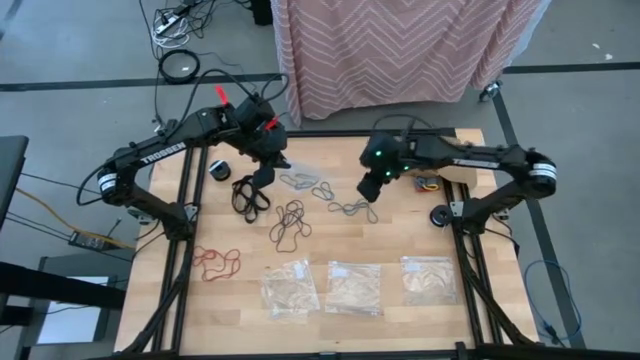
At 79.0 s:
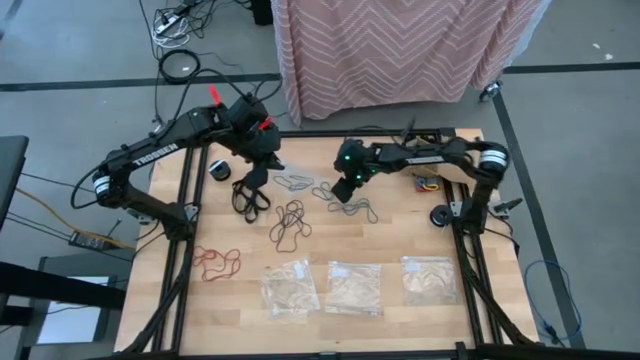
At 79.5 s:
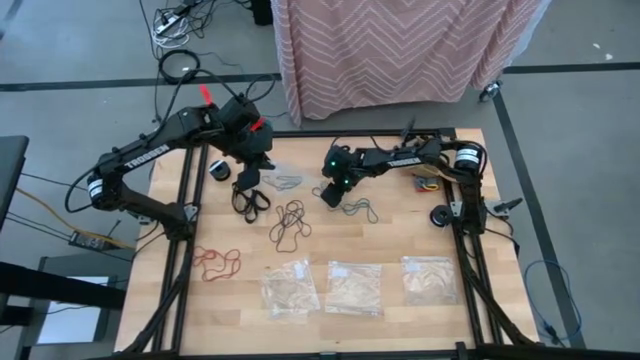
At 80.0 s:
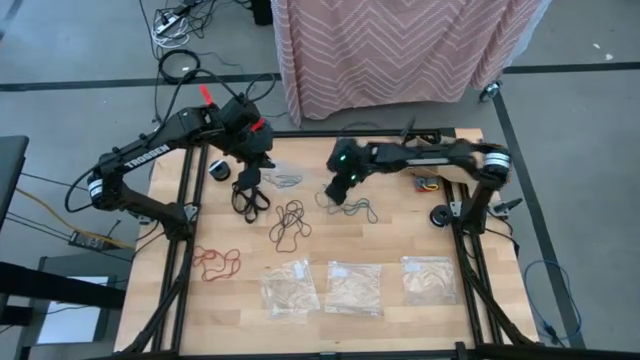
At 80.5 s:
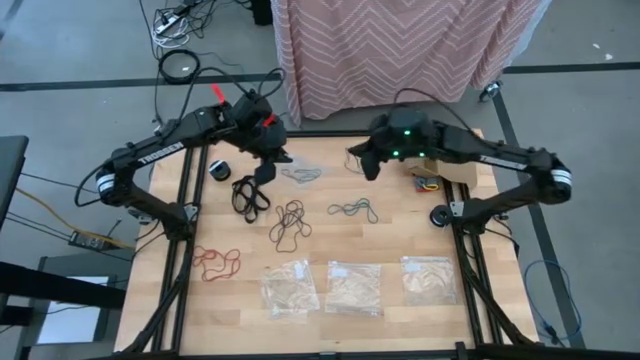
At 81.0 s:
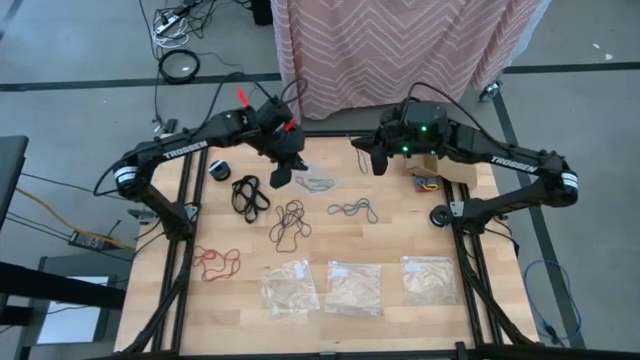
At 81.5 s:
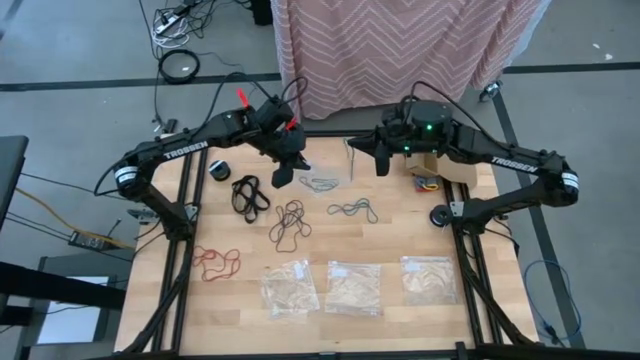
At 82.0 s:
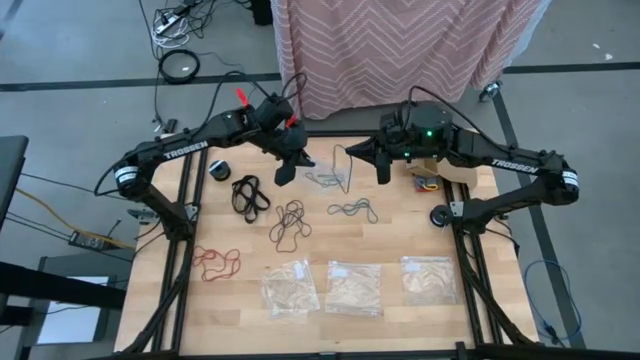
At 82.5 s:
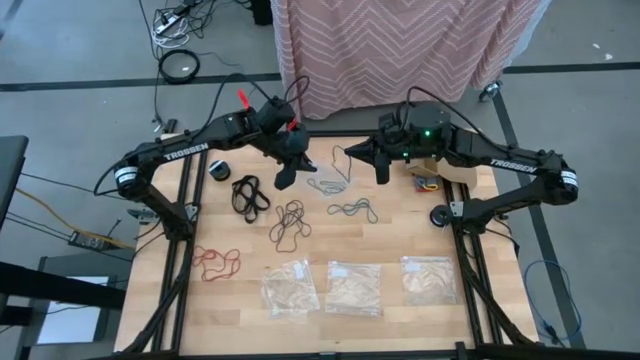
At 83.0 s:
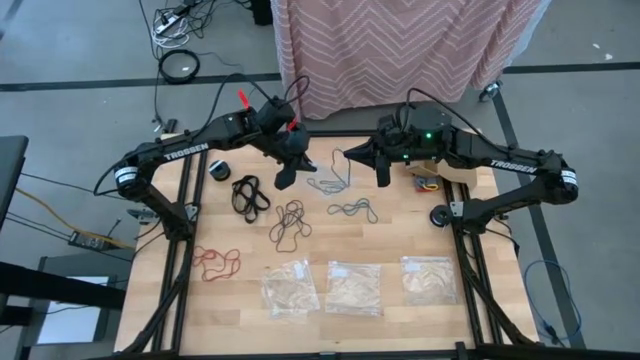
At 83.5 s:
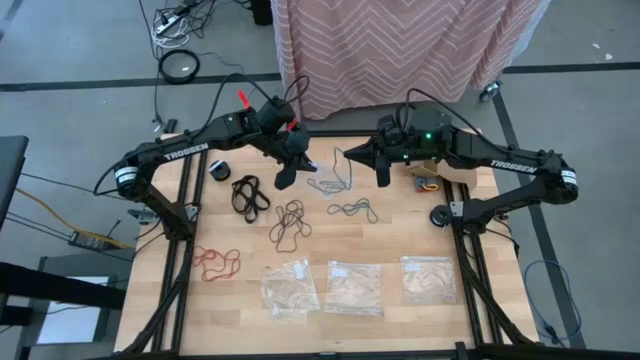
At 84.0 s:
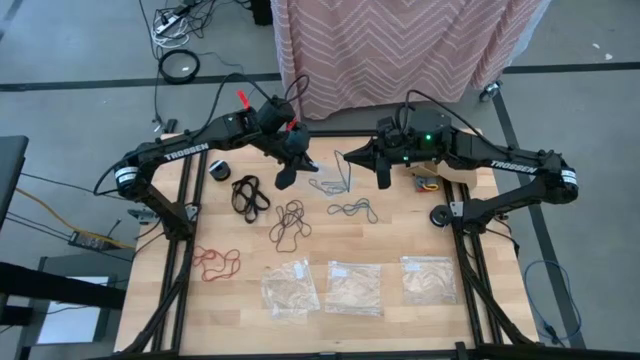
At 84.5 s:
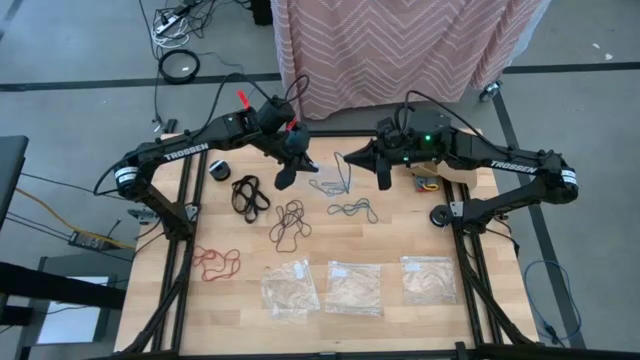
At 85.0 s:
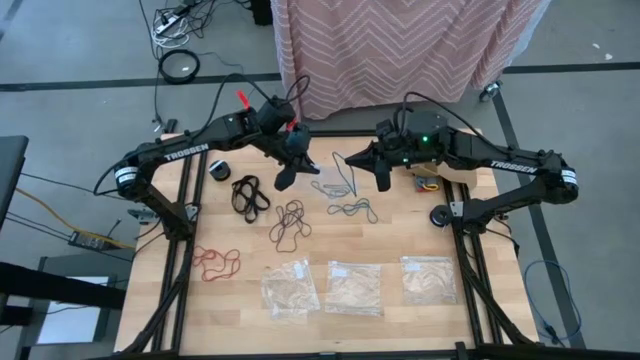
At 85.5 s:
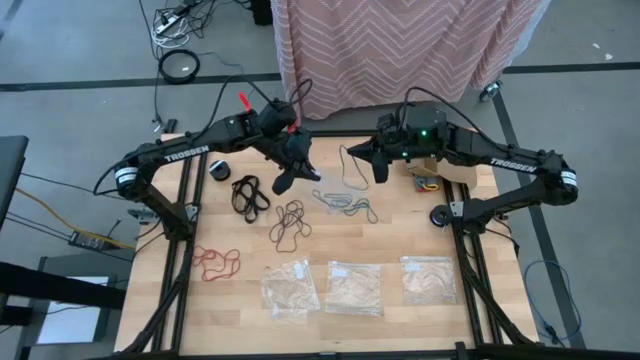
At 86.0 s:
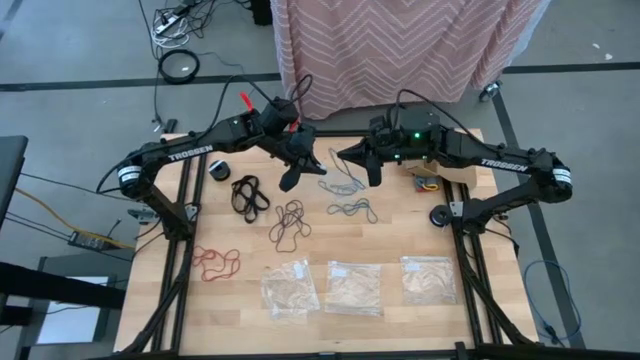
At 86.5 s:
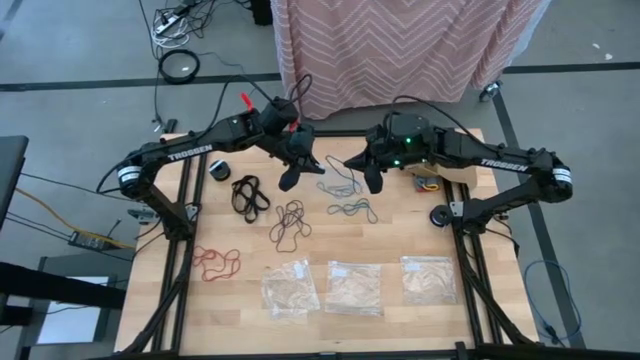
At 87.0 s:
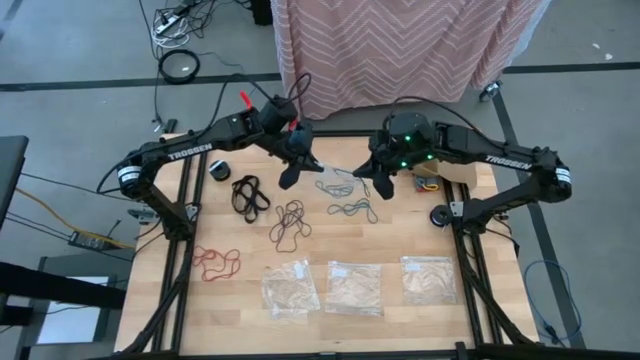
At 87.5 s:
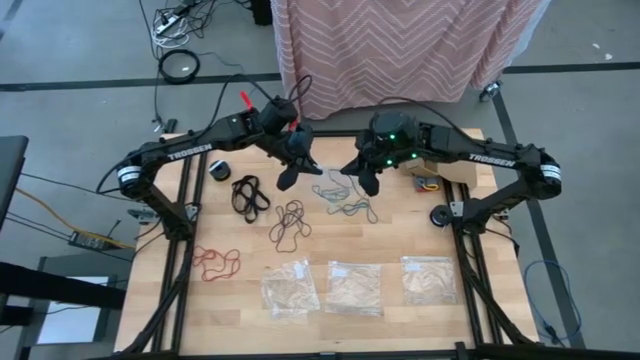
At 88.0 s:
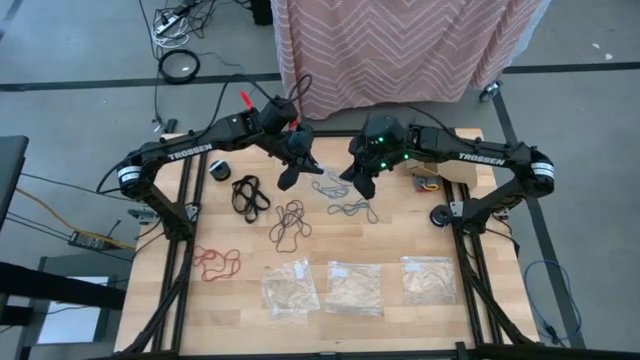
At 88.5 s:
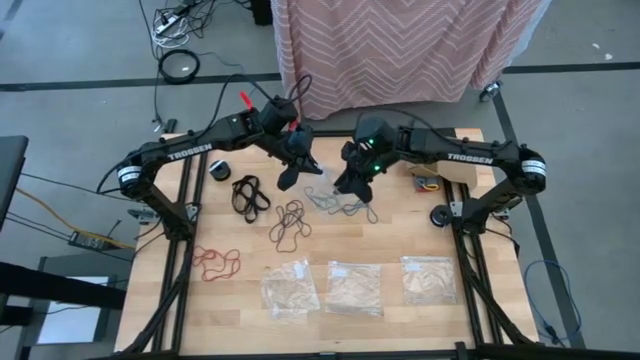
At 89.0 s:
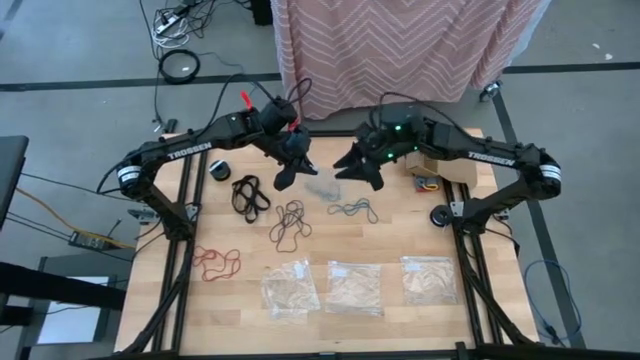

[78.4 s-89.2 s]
Task: Sort rubber bands
Put the blue rubber band into the top transparent zip bag

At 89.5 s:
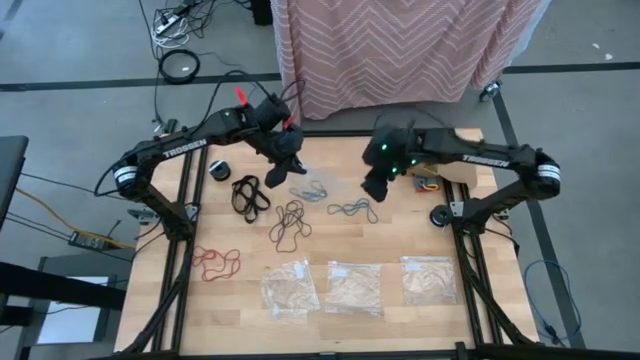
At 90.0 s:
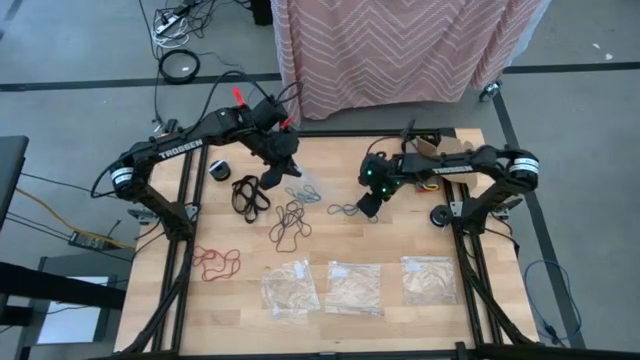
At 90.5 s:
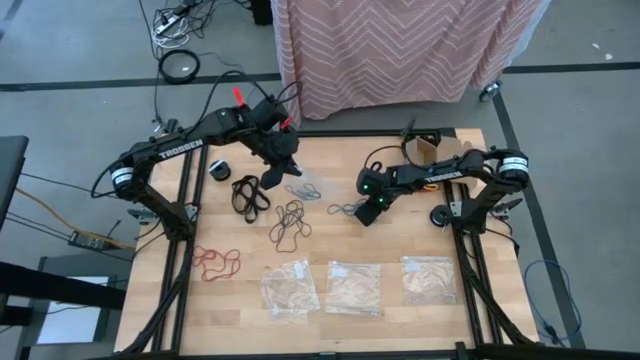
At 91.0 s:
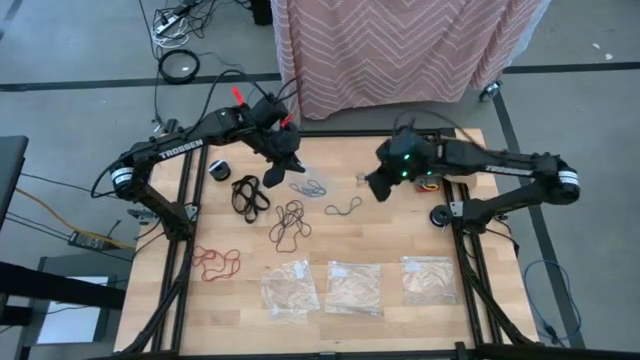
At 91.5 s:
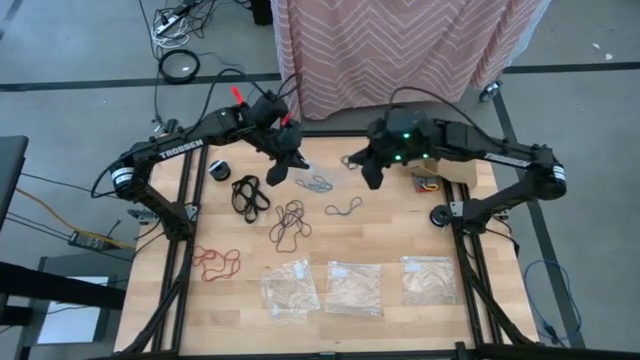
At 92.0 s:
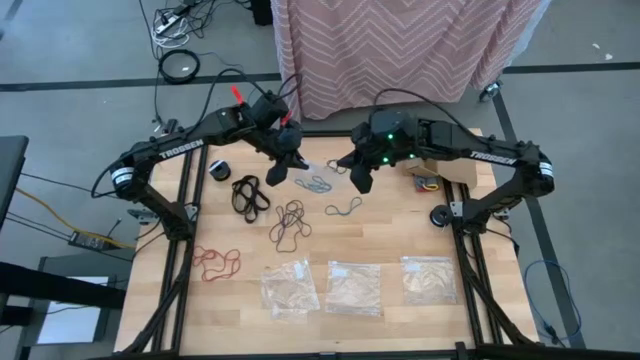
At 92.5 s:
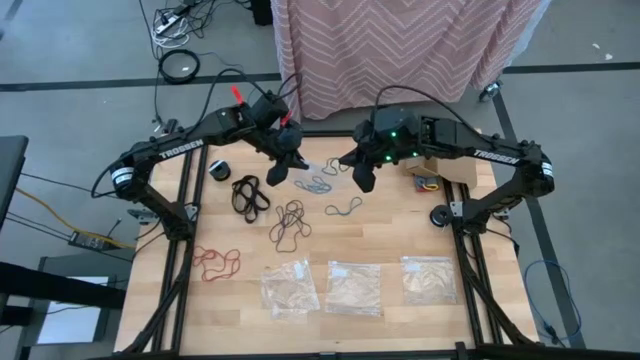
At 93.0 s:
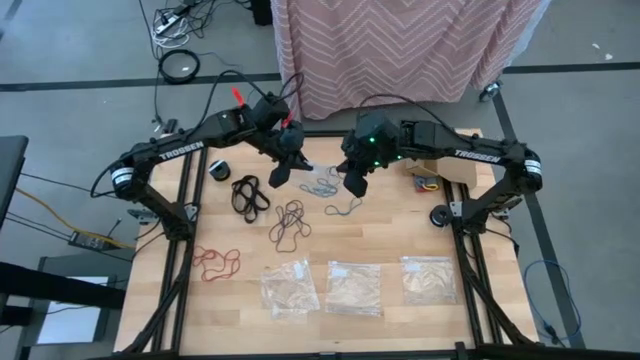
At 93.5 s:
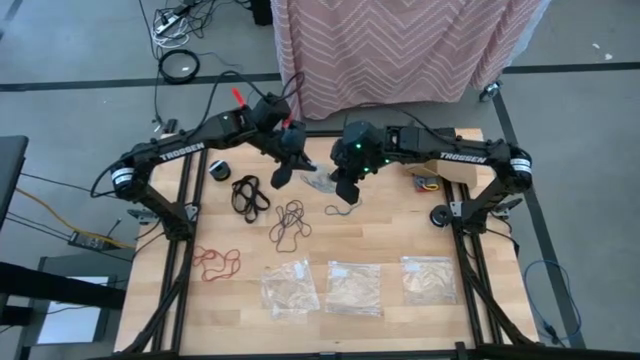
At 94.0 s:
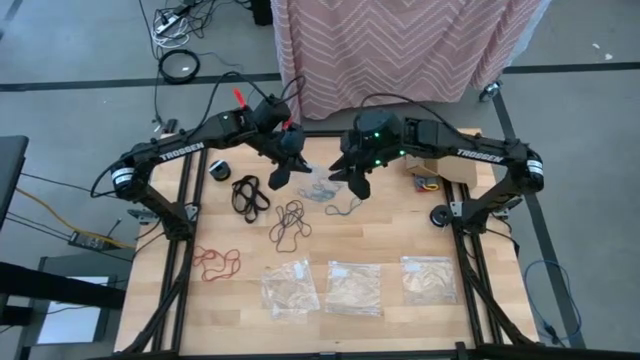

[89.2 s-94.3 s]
Put the blue rubber band into the top transparent zip bag

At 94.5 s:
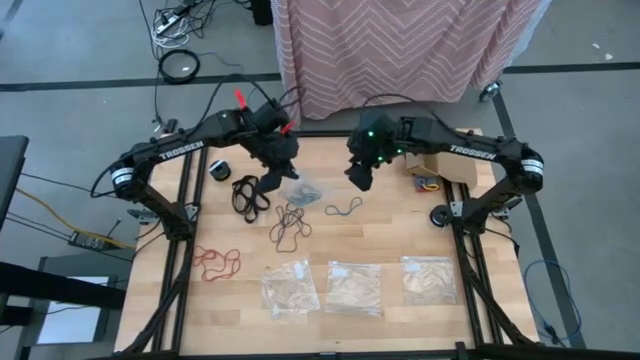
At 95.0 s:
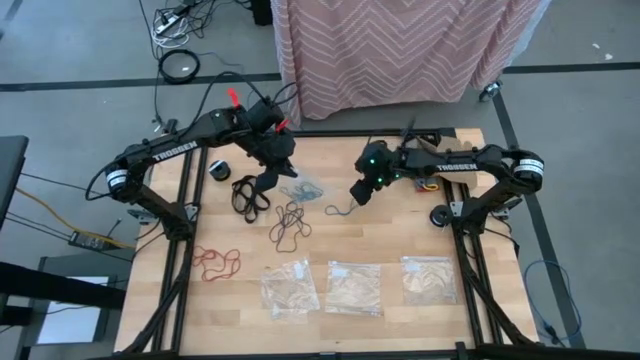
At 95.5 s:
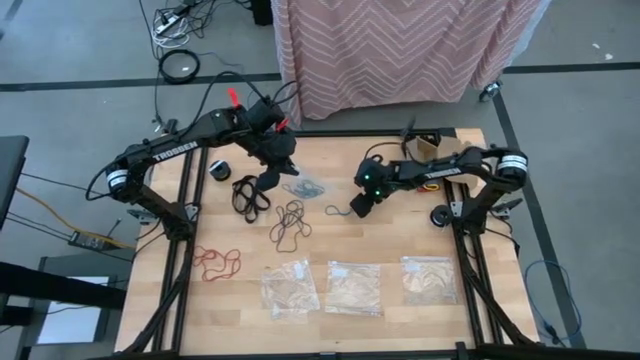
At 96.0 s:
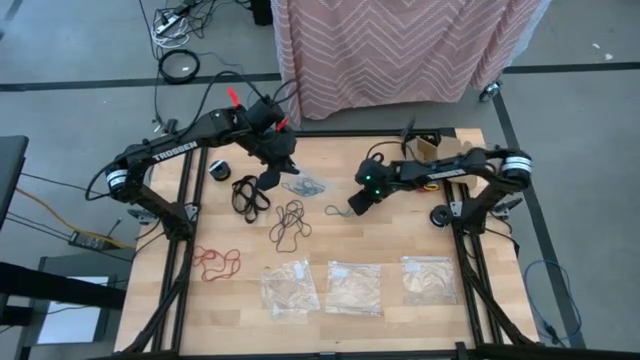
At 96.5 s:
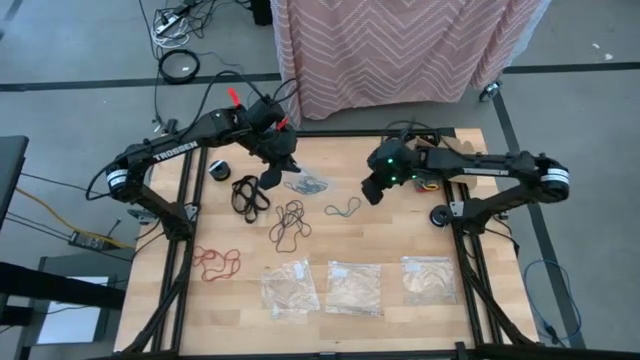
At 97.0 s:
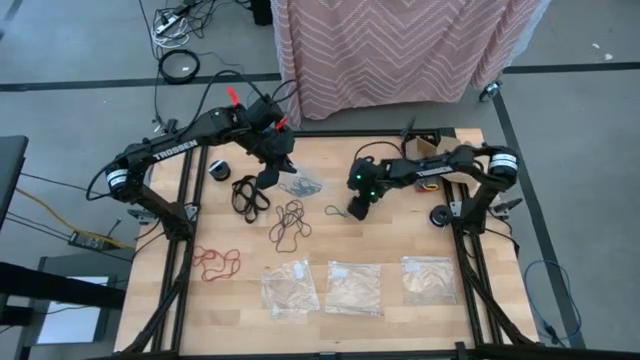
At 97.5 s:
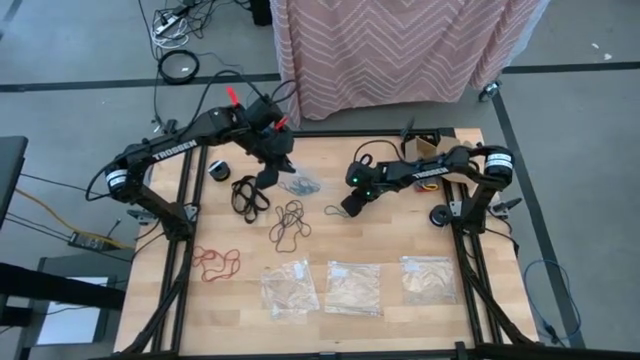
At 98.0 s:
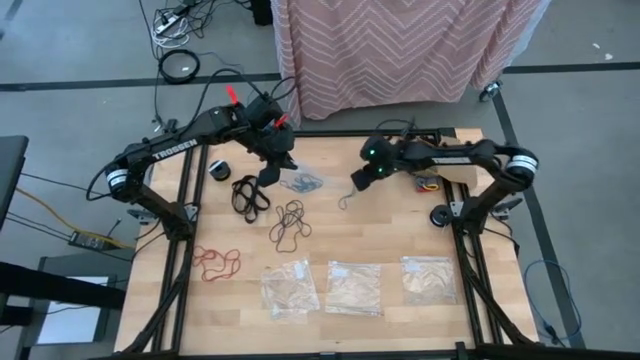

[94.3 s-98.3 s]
Put the blue rubber band into the top transparent zip bag

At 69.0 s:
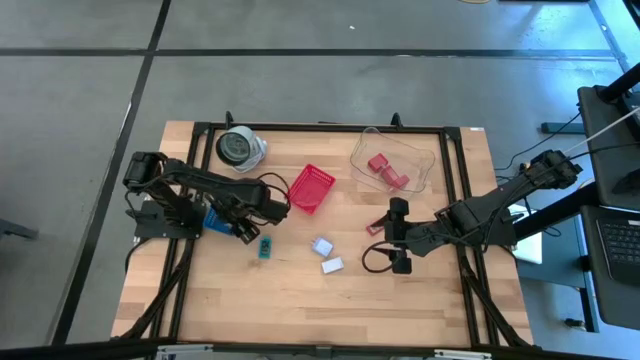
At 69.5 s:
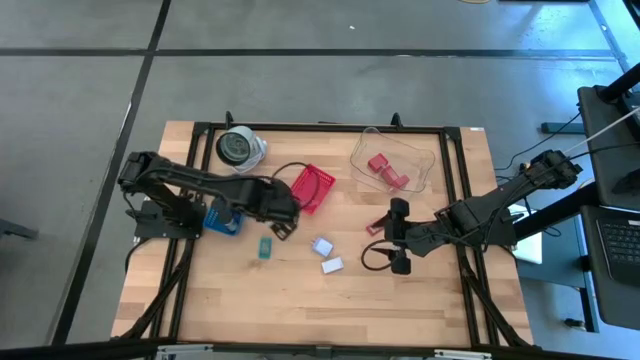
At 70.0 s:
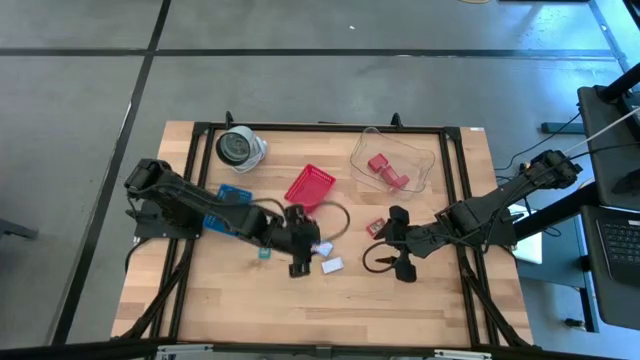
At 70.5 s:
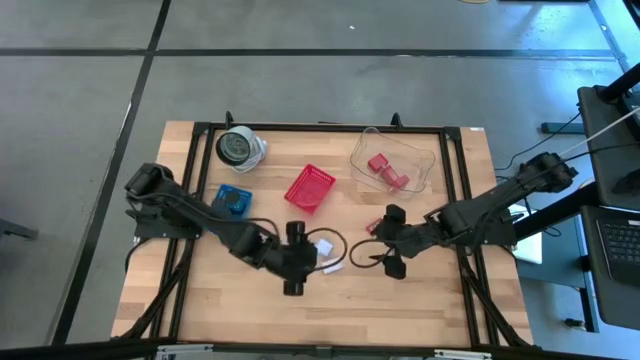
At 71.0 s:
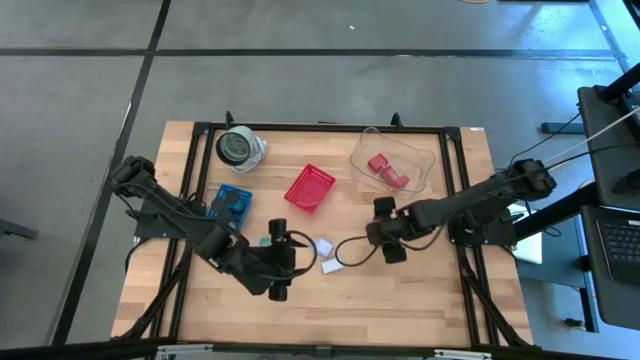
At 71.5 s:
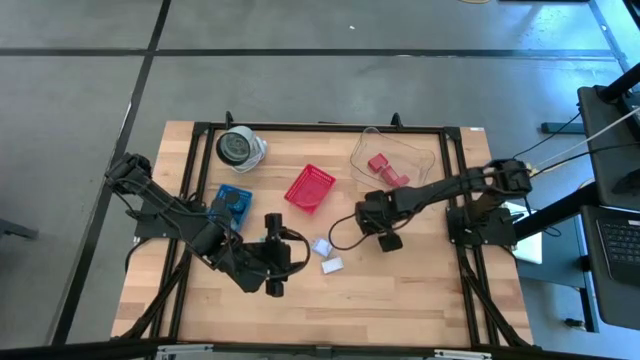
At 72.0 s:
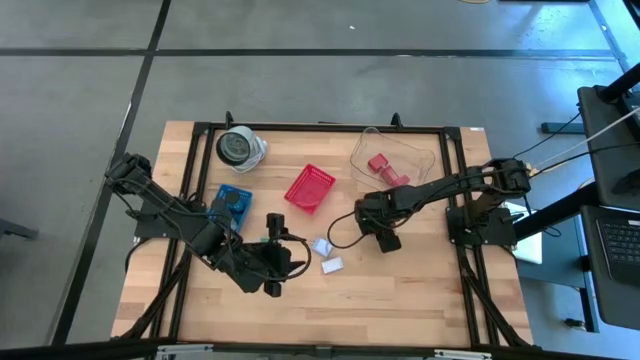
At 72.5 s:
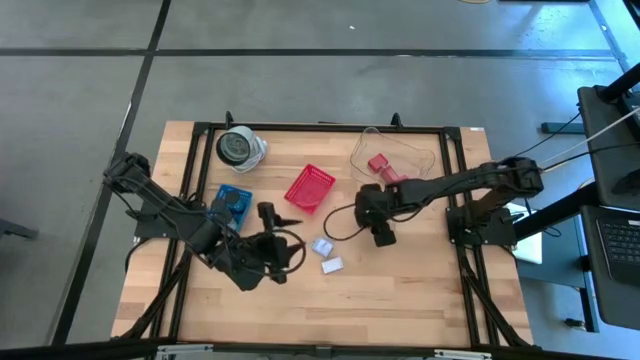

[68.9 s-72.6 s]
Task: Pick & Place Office items
Put the red digital clock into the red bin
